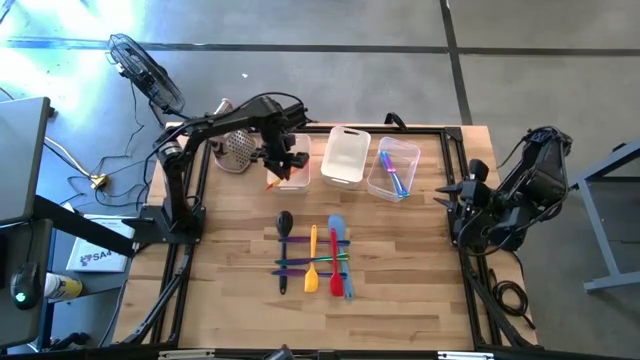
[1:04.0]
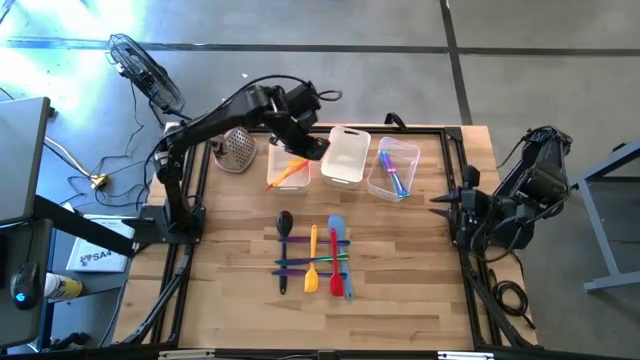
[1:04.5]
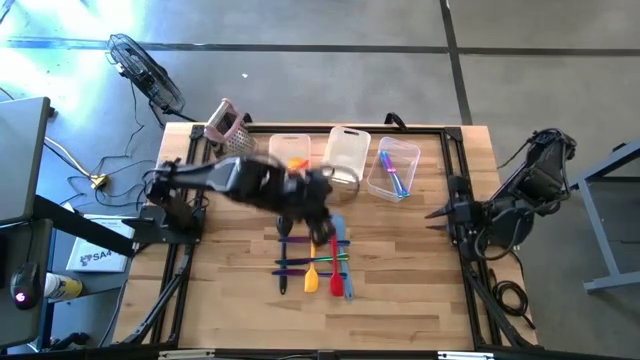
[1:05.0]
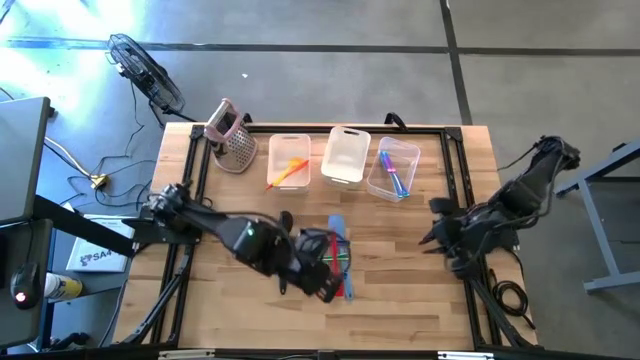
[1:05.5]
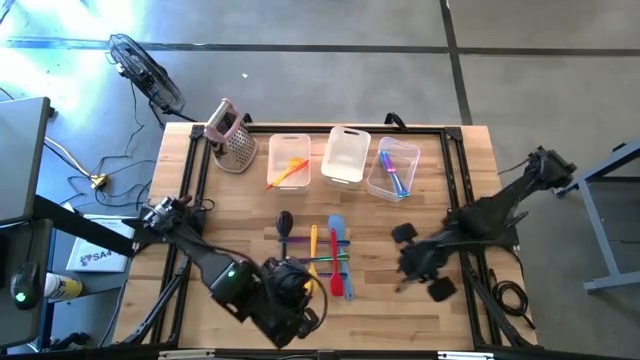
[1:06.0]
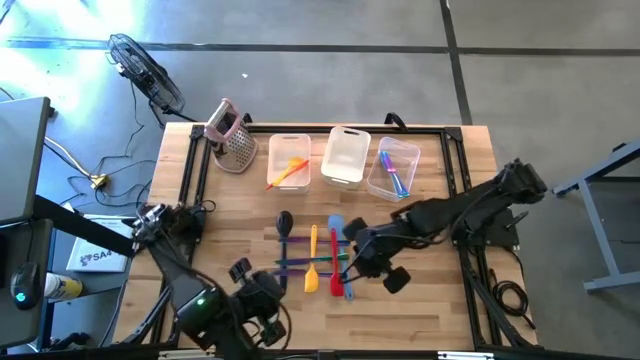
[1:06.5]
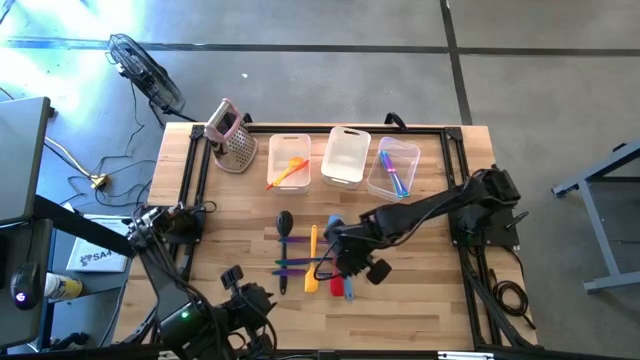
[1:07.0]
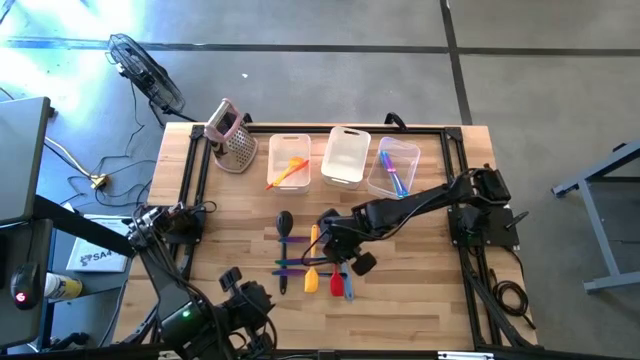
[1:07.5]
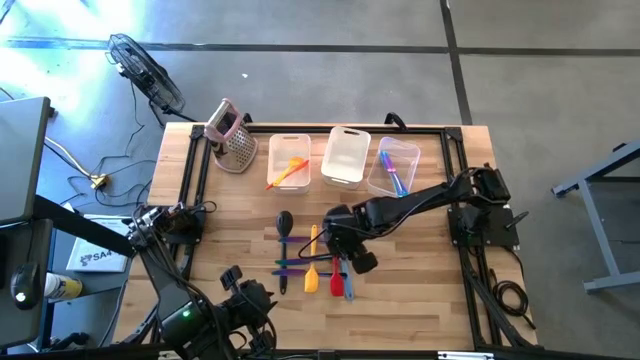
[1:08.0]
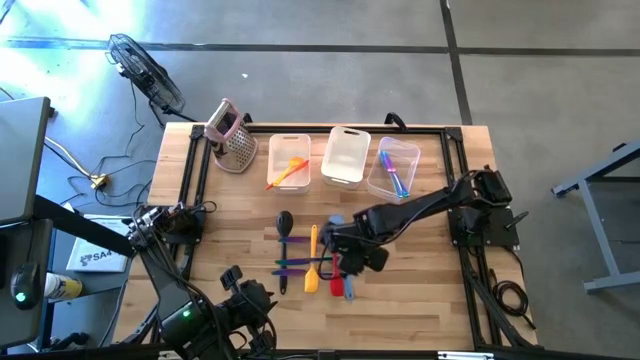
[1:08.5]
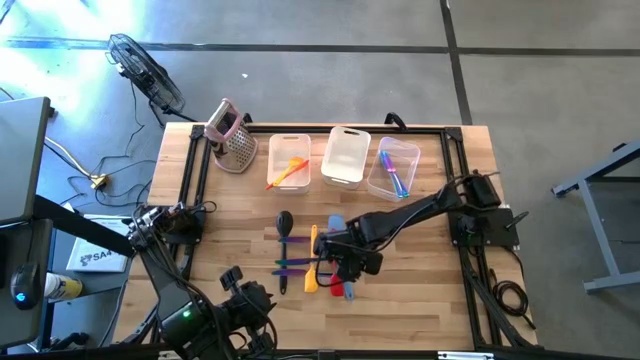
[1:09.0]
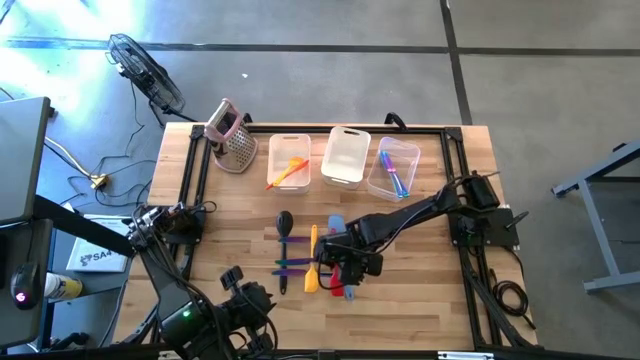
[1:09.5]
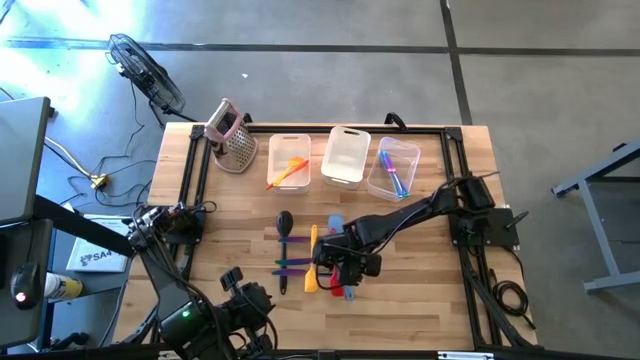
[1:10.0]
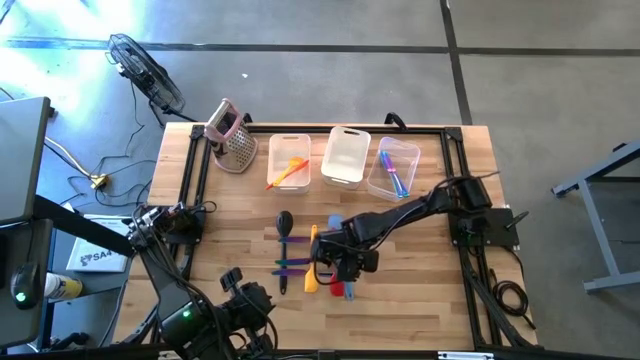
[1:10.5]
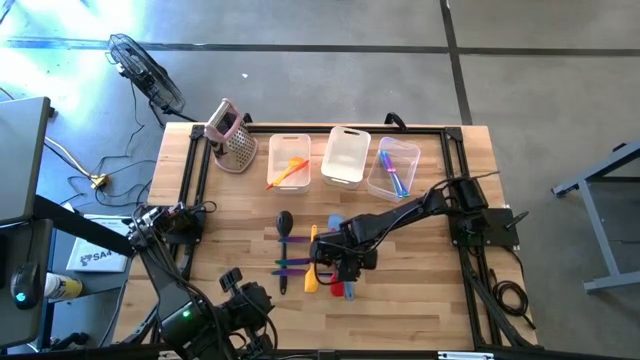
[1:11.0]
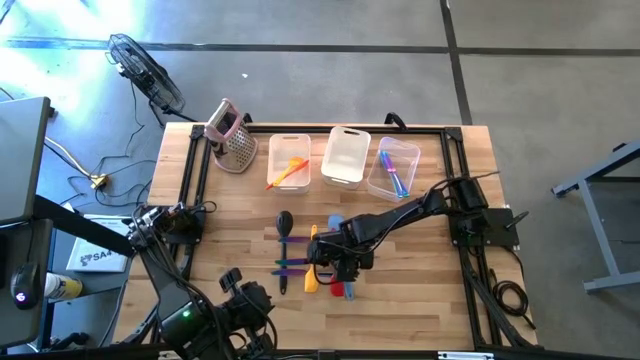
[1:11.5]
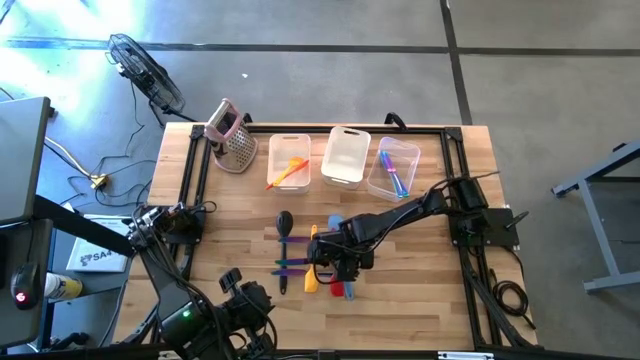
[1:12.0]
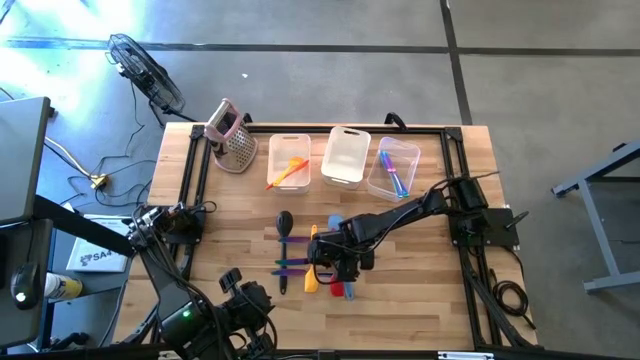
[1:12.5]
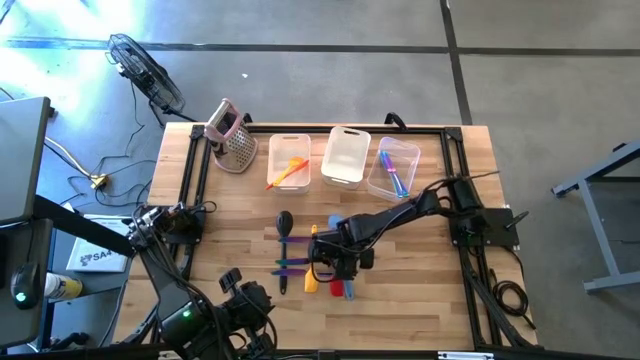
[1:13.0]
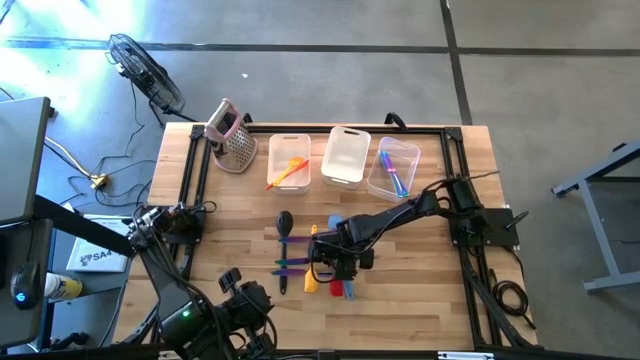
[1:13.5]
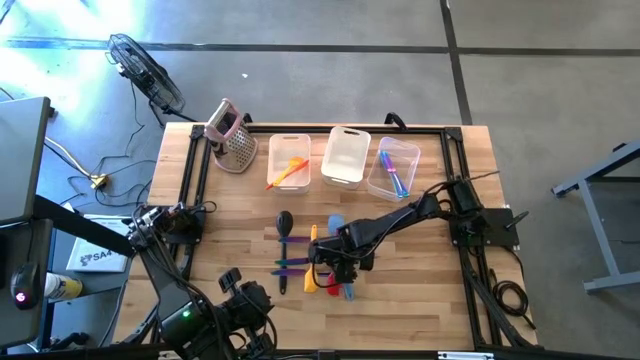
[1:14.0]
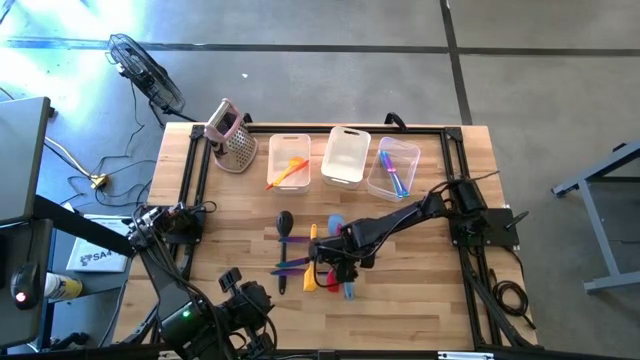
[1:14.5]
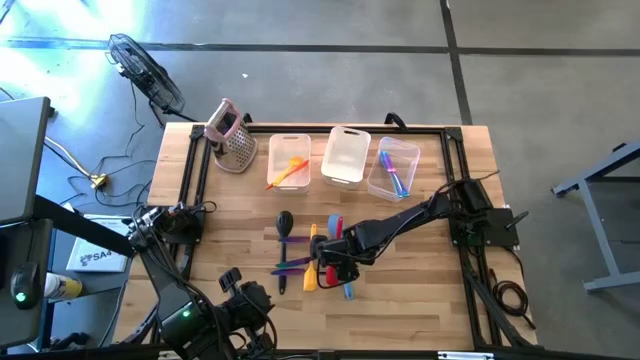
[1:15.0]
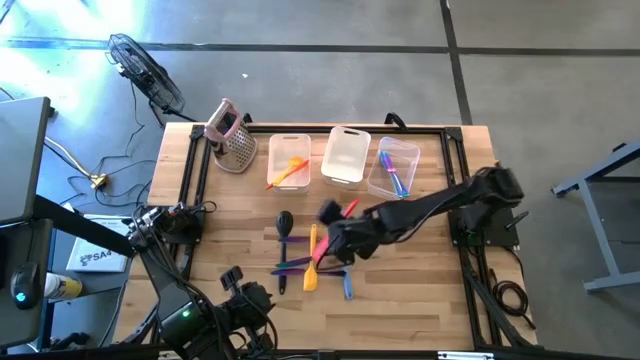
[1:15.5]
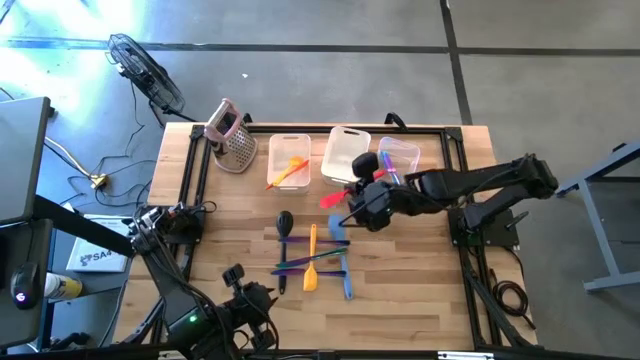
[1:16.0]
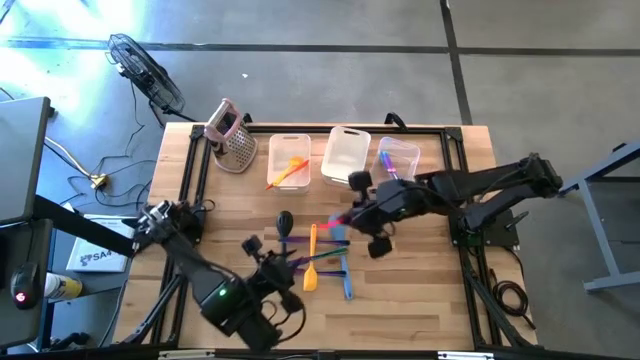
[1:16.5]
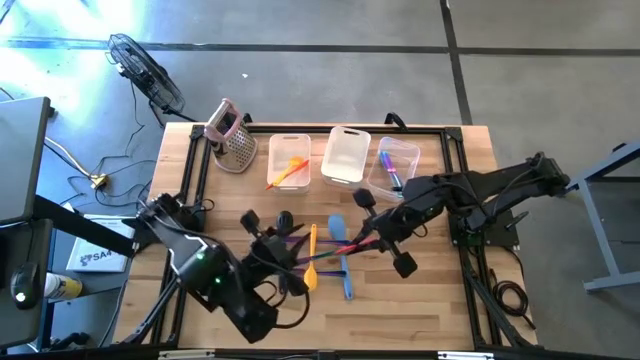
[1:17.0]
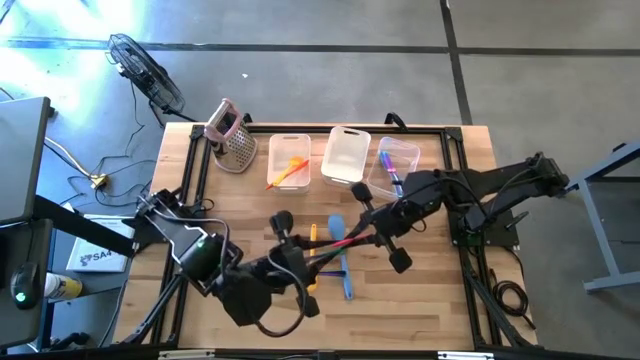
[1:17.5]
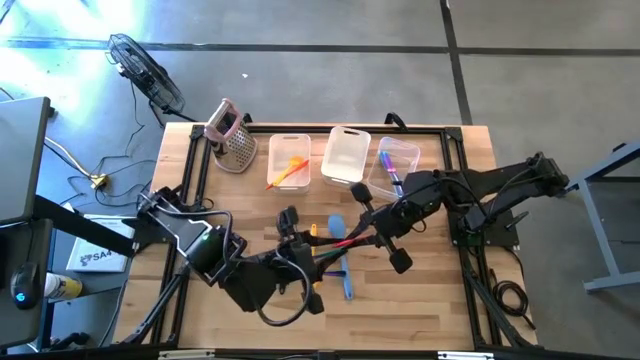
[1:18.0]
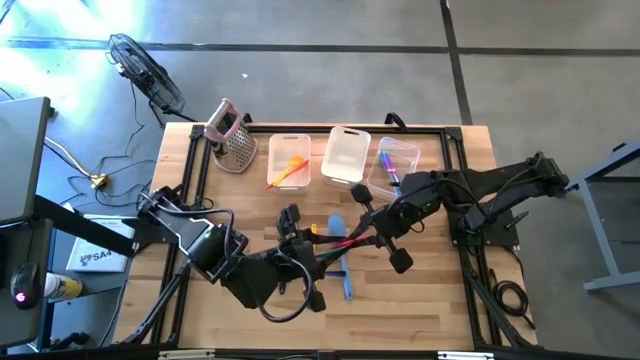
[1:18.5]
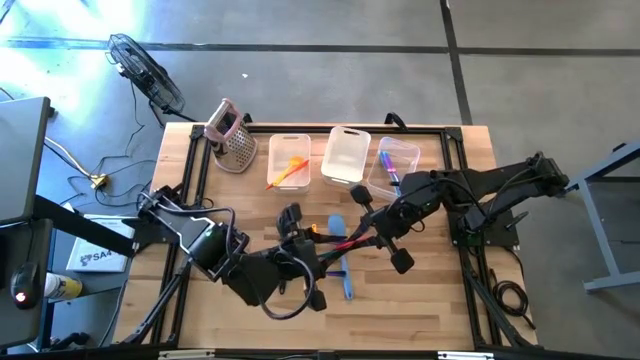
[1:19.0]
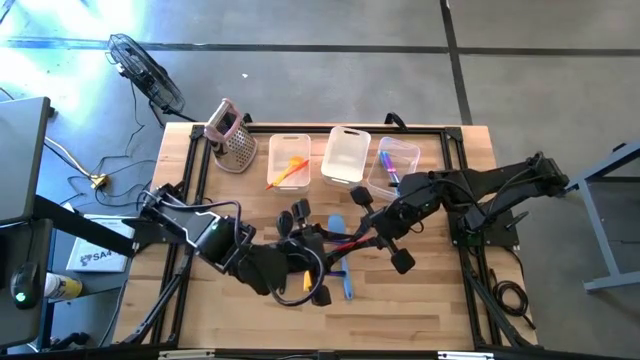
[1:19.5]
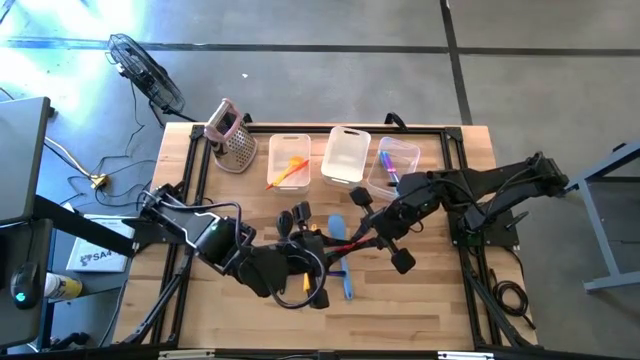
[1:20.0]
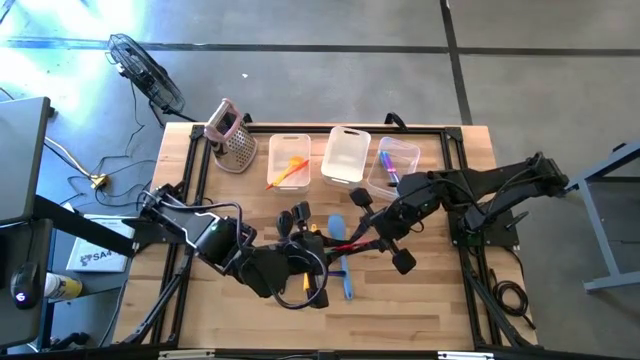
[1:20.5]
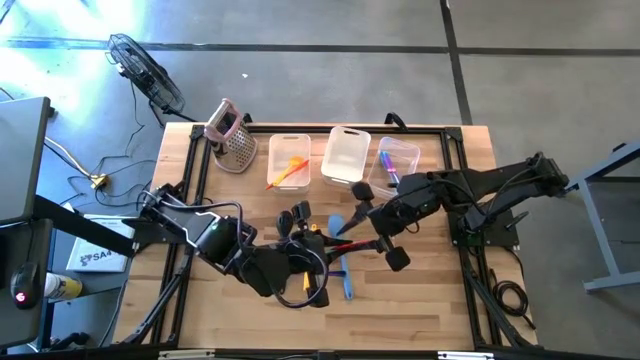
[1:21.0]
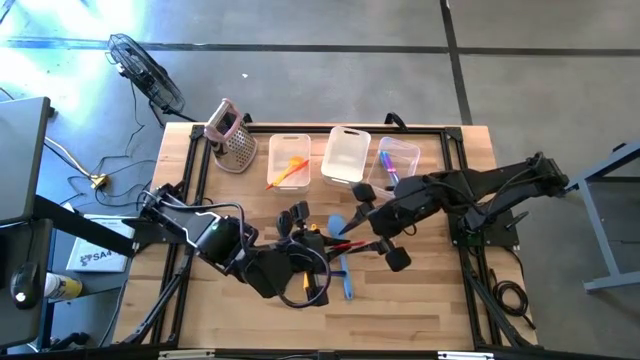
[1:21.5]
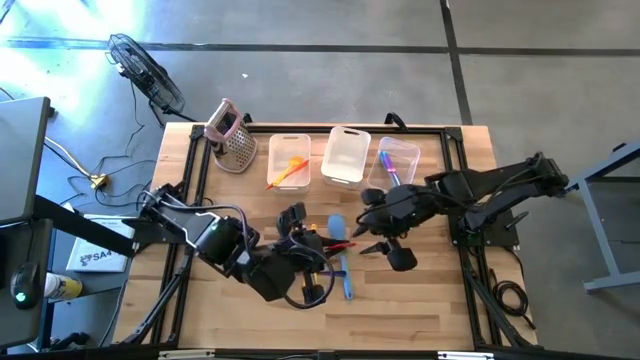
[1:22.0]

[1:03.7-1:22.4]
Task: Pick & Place Kitchen Items
Put the red spatula into the left white bin

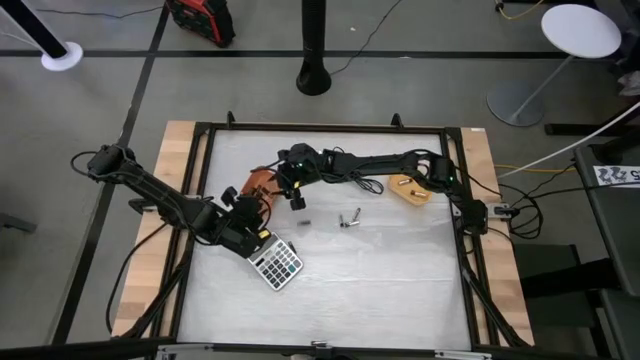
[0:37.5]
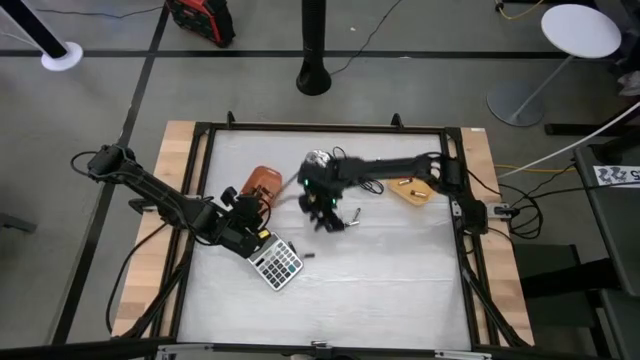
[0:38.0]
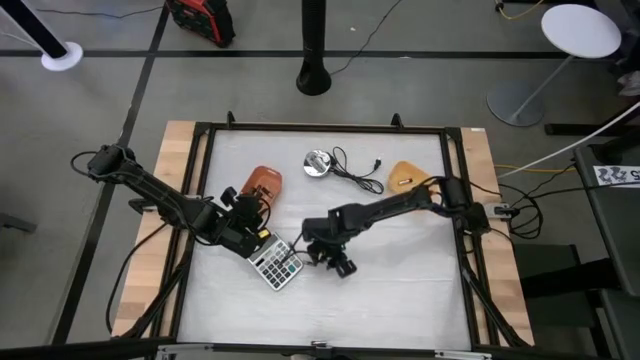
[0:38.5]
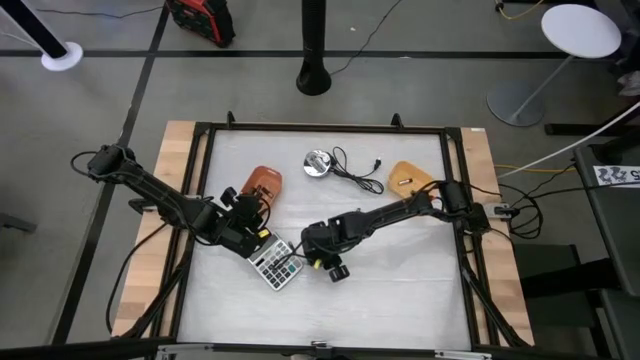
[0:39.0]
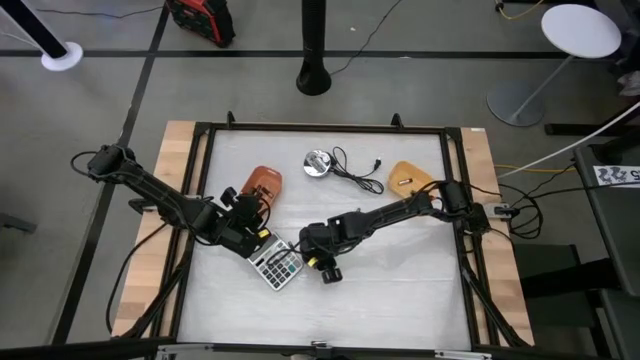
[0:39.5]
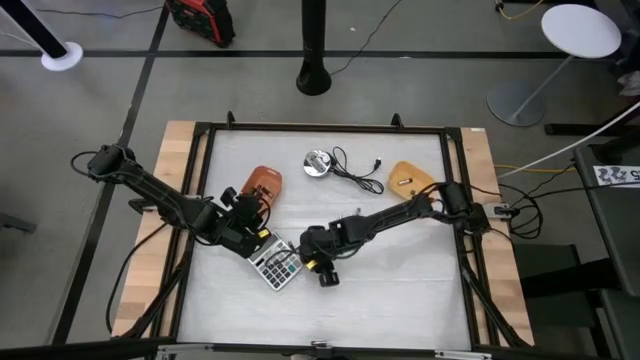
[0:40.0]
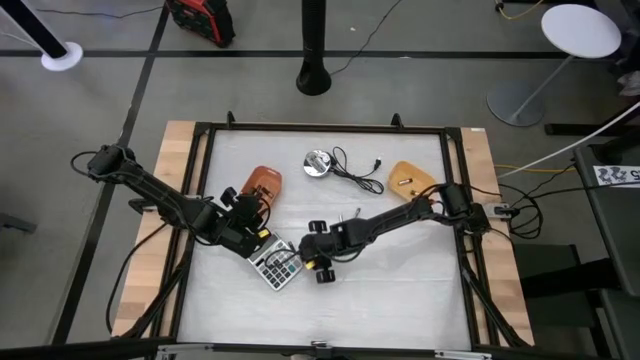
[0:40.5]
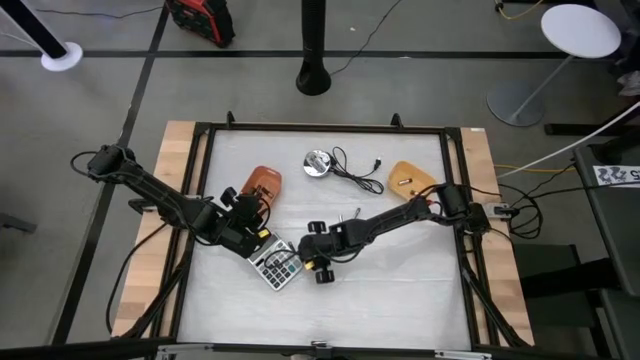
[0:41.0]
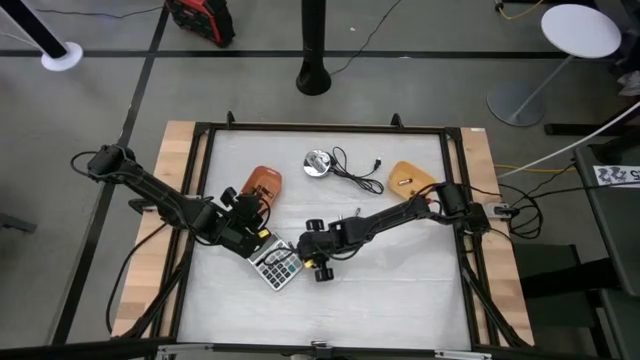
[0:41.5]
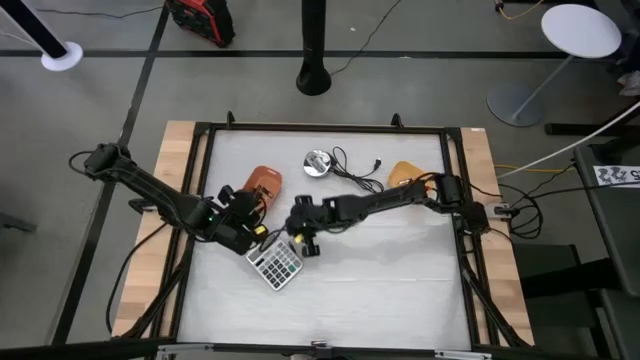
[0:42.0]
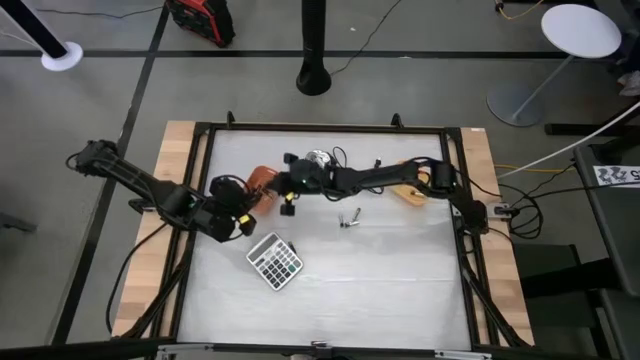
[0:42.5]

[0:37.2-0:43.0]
Task: Sort batteries
Put the black battery into the orange bin
